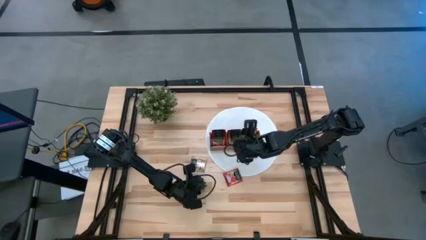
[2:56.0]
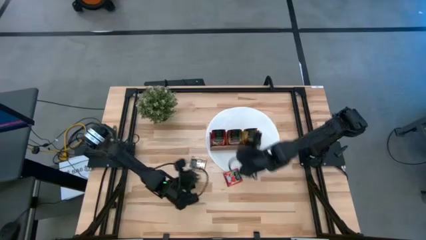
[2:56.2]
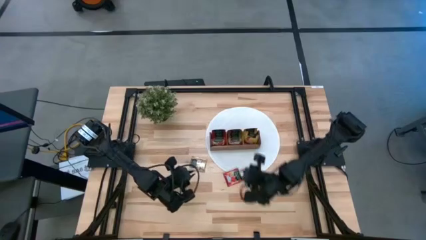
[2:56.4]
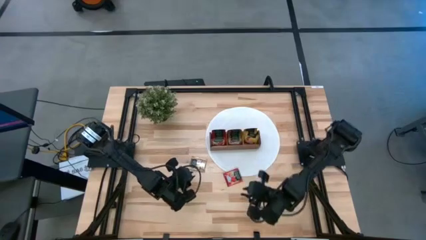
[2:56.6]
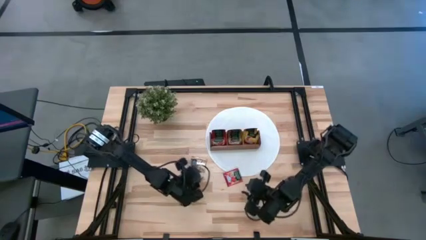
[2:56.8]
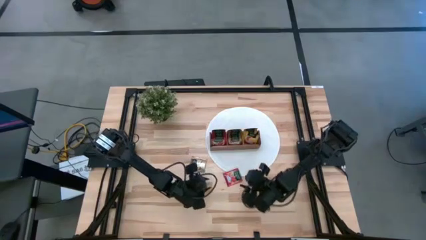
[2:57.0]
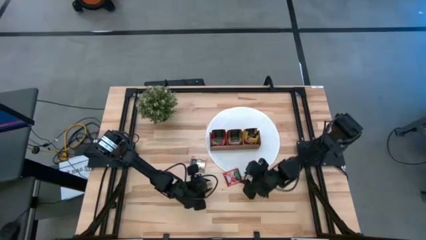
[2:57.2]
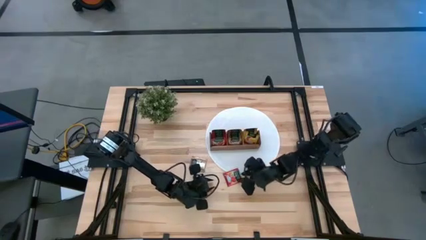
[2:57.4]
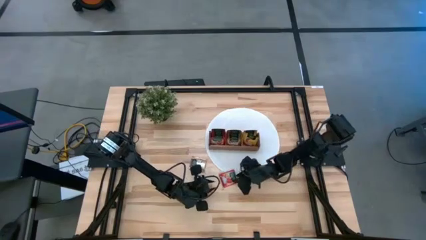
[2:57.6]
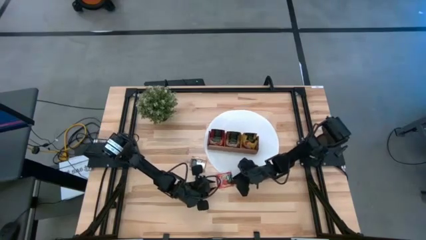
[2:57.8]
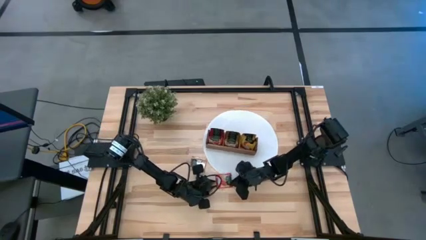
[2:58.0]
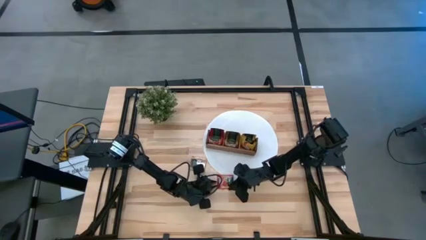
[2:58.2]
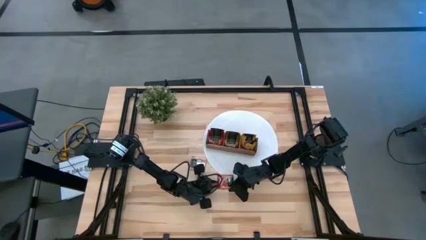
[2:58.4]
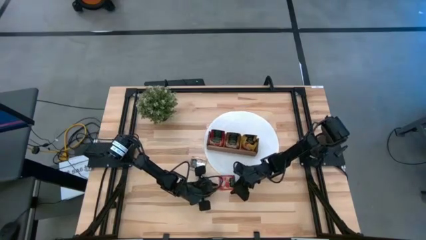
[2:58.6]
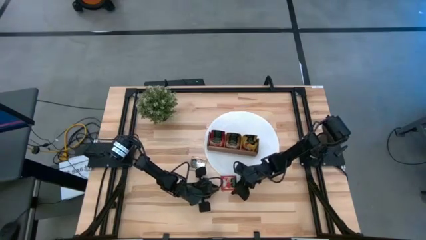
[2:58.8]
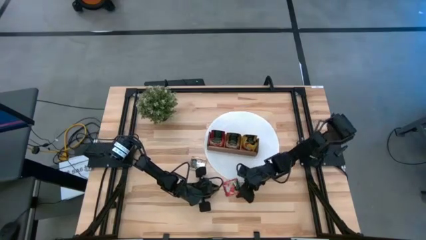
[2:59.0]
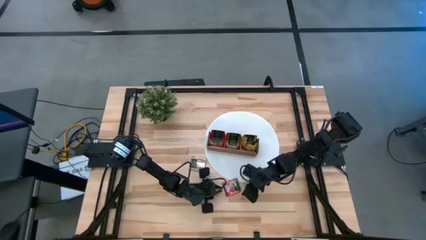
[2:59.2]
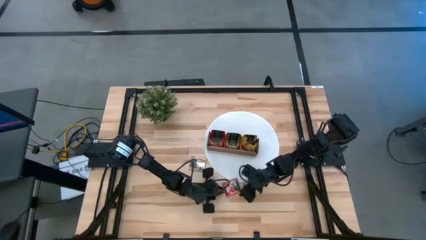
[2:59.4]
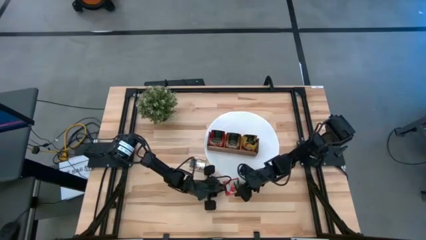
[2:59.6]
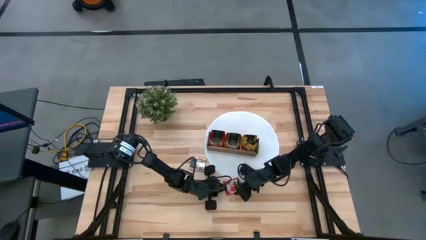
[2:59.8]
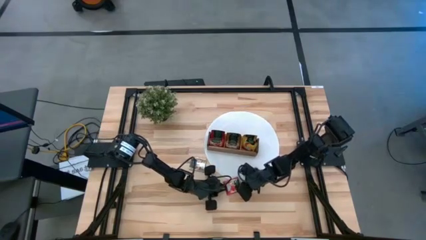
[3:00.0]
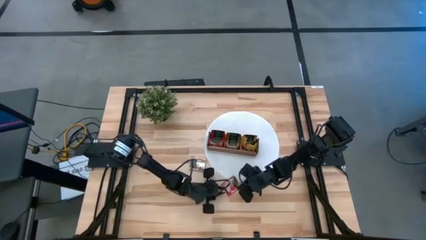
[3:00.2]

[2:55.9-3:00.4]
Task: Pick & Place Tea
Put the red tea bag into the left section of the wooden organizer

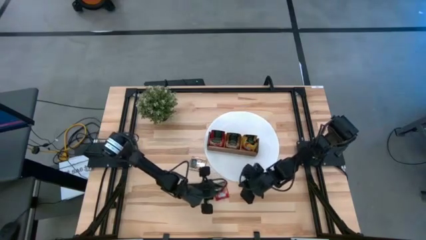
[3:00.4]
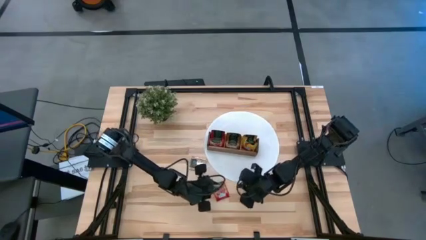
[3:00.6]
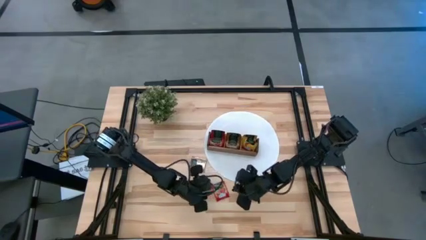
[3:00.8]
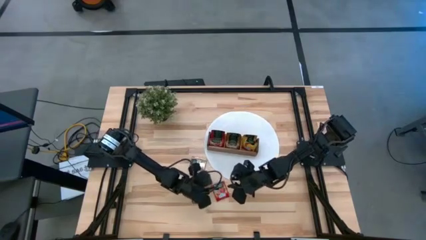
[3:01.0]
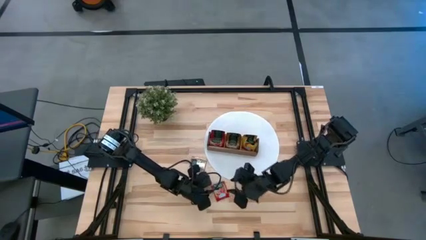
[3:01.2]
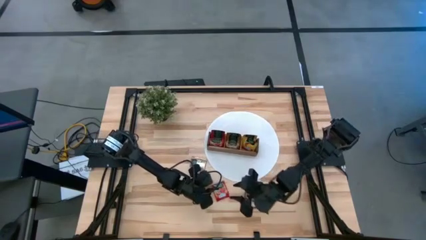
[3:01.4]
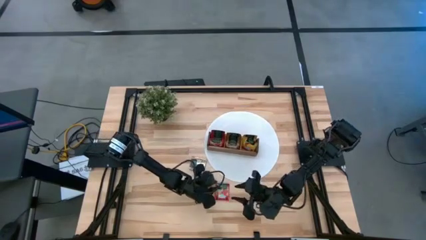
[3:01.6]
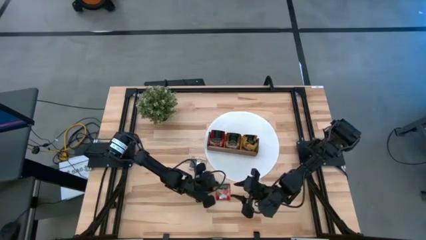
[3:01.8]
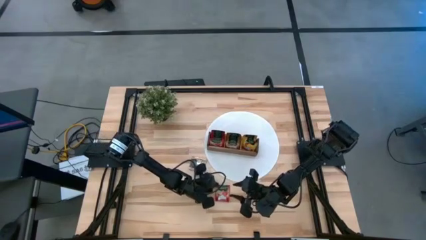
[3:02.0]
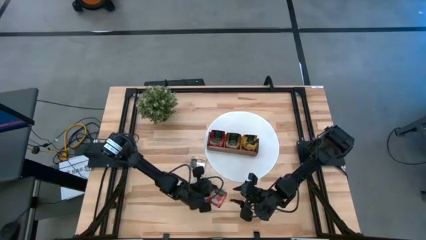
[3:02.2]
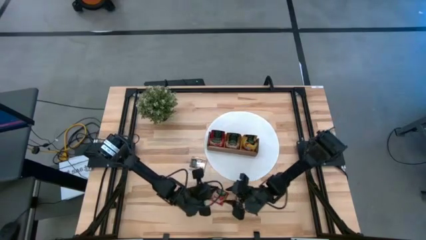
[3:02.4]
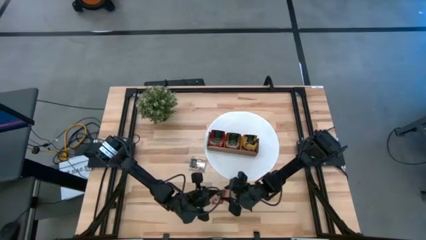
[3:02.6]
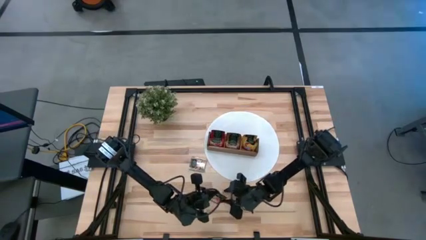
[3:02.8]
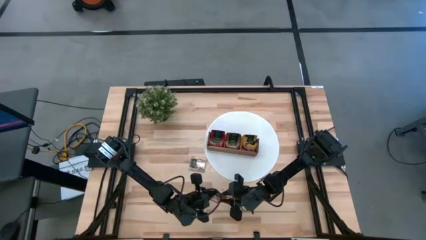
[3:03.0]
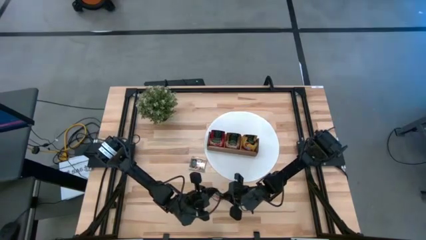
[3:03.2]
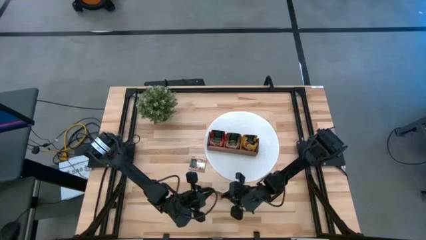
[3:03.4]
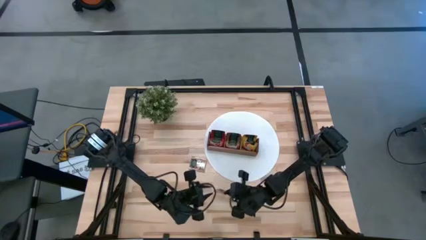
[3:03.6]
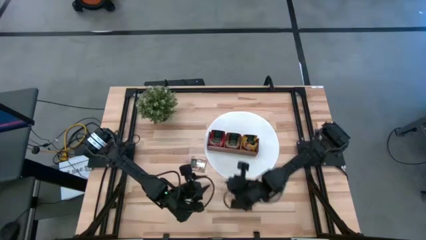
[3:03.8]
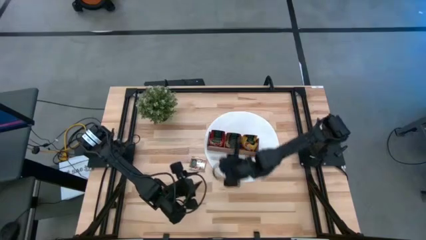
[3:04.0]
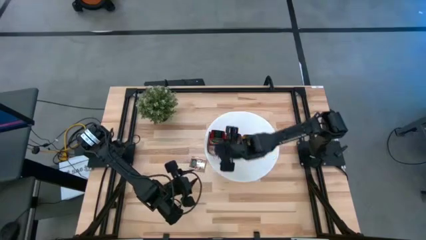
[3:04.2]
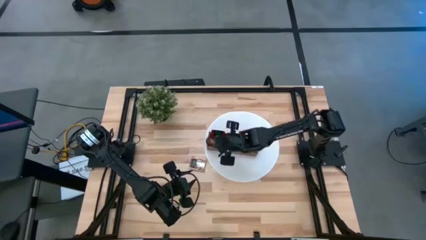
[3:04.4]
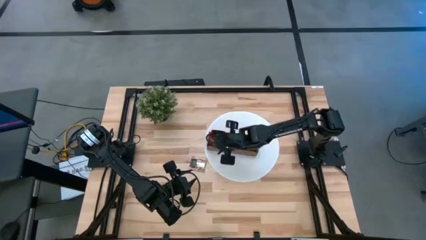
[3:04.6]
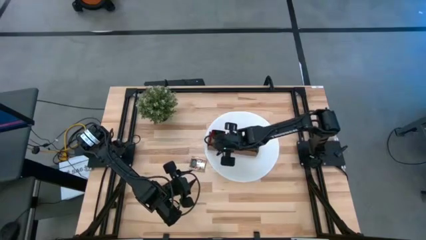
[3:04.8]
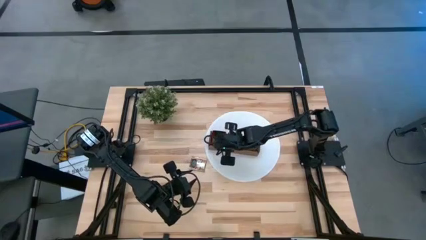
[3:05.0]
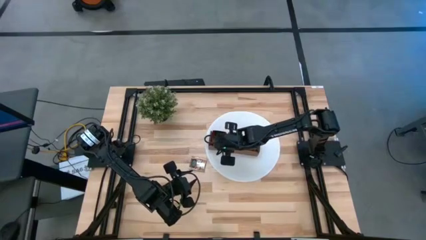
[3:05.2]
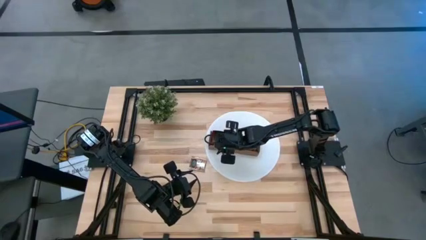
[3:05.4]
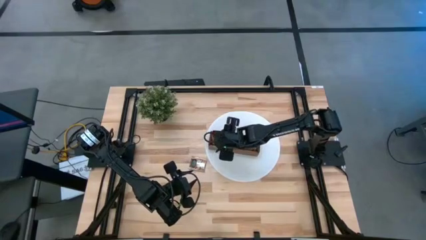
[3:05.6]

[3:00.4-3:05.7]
Put the red tea bag into the left section of the wooden organizer

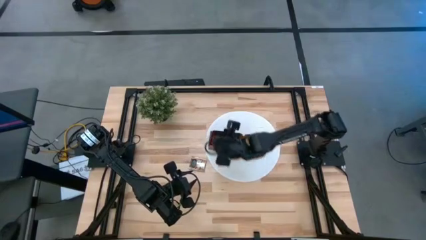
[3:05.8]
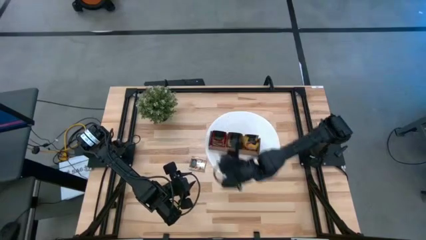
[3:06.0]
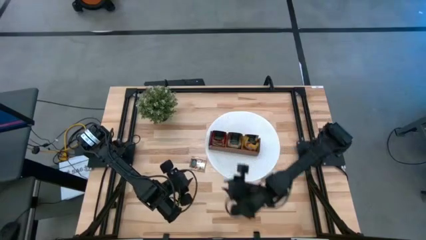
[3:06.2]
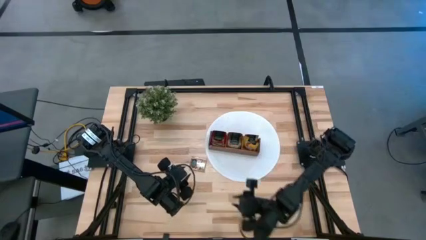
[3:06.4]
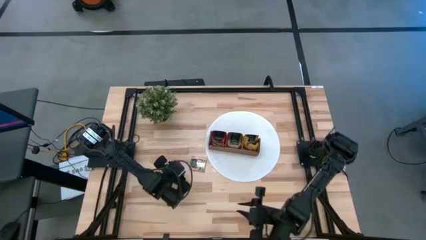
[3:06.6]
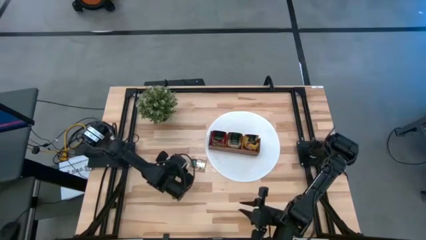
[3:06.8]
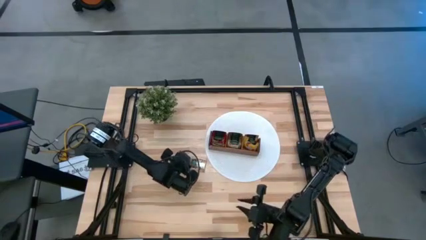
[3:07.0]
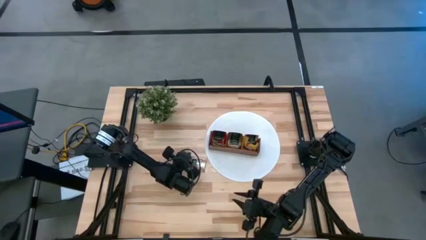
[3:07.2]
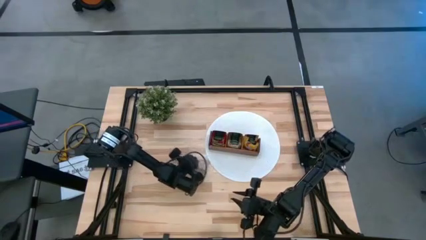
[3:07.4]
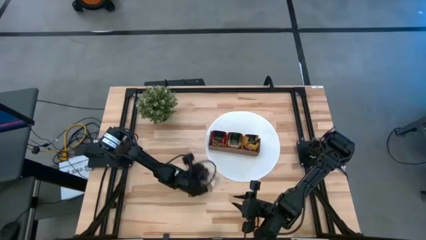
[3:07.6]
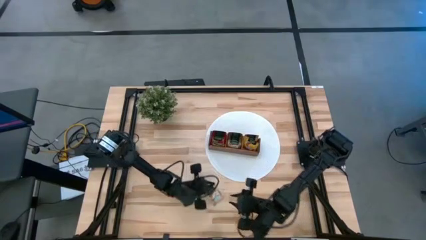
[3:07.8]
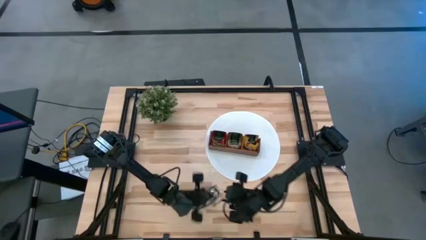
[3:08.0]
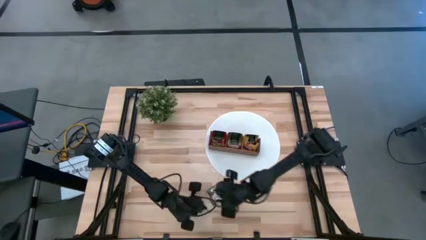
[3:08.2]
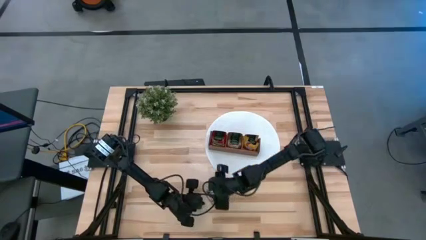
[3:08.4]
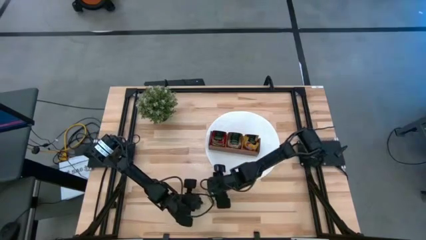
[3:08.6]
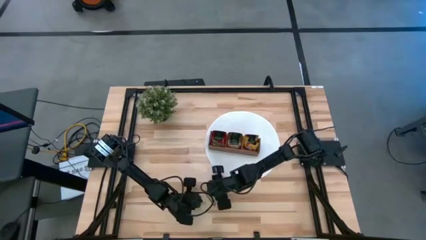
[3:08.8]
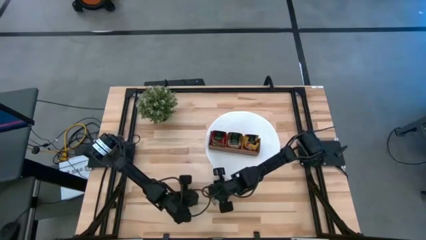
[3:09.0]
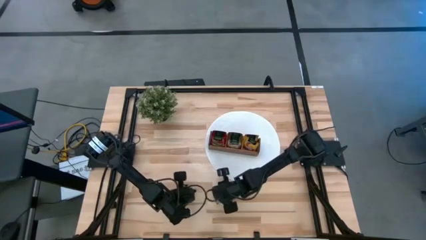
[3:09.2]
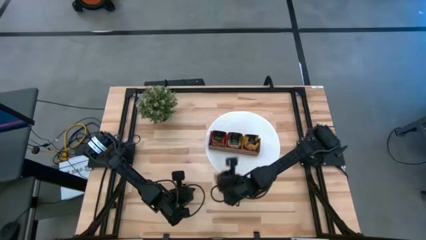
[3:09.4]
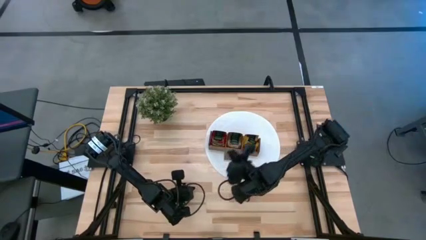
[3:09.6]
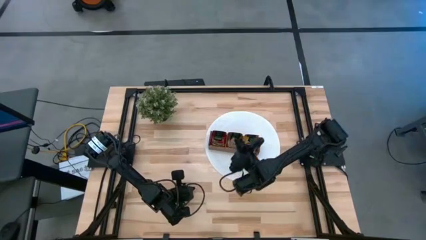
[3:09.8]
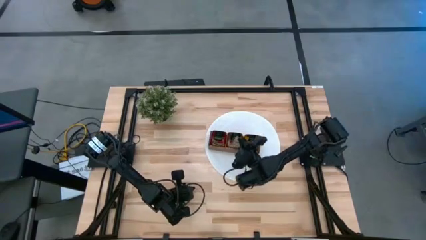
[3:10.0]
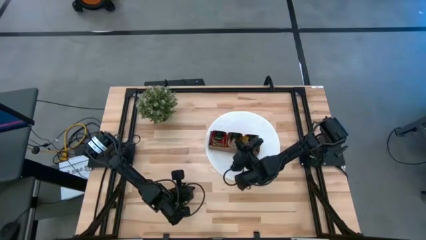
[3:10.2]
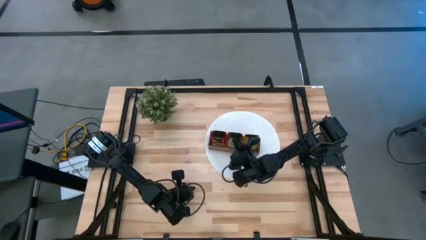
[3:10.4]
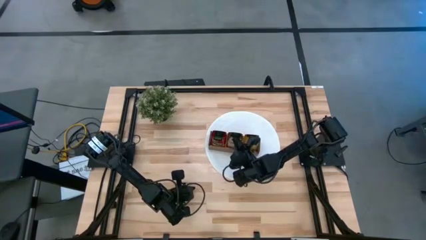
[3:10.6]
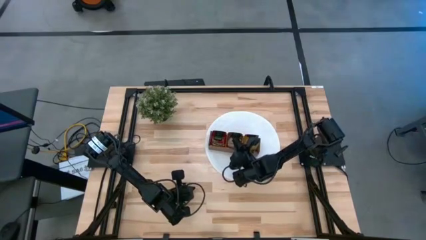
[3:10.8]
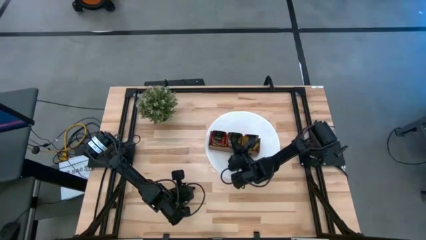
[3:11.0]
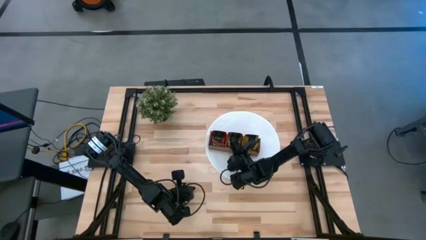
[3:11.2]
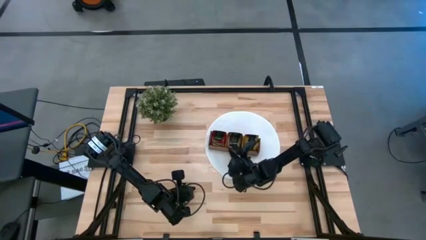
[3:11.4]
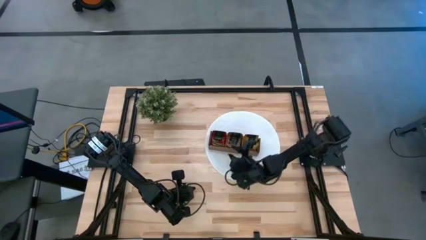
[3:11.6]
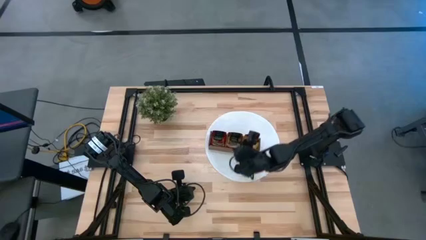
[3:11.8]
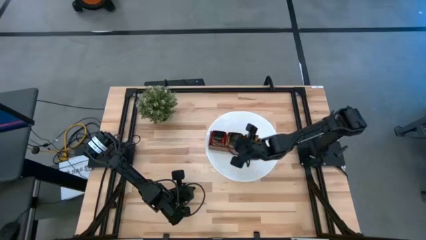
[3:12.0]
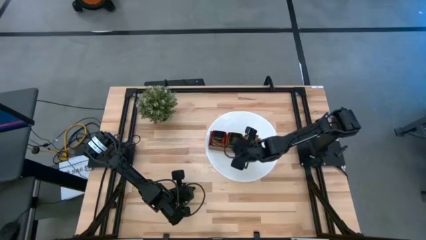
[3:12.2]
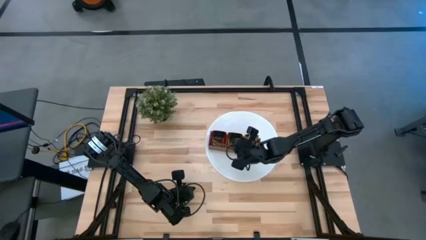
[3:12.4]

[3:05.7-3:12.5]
Put the brown tea bag into the middle section of the wooden organizer

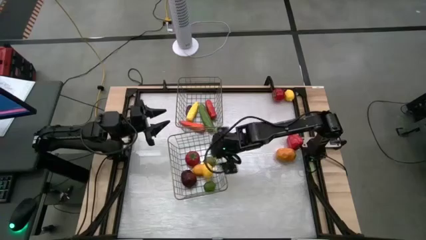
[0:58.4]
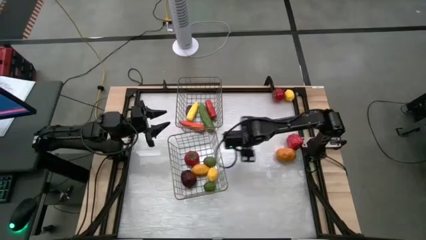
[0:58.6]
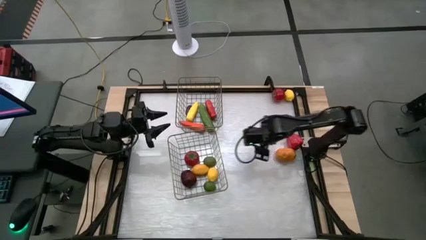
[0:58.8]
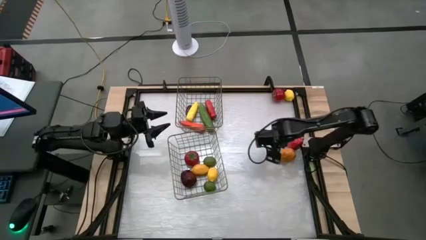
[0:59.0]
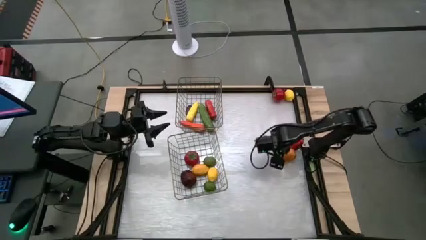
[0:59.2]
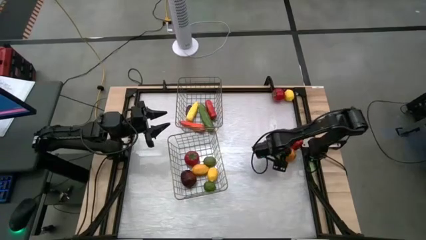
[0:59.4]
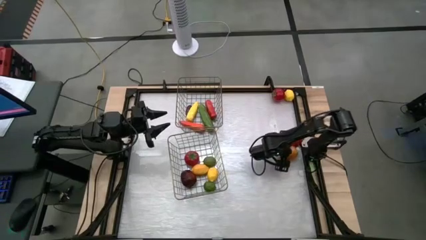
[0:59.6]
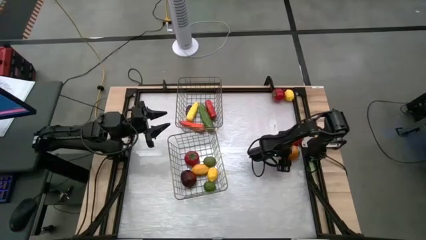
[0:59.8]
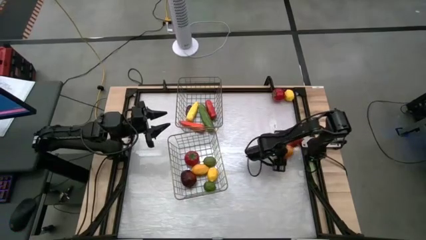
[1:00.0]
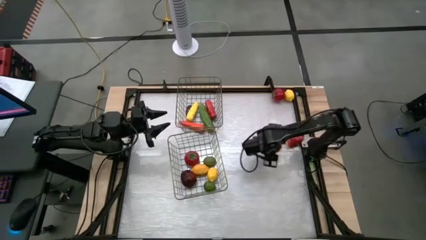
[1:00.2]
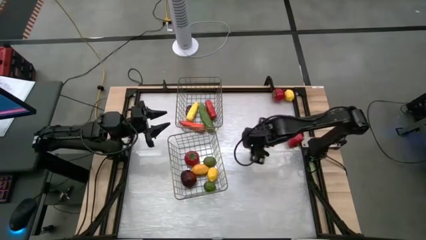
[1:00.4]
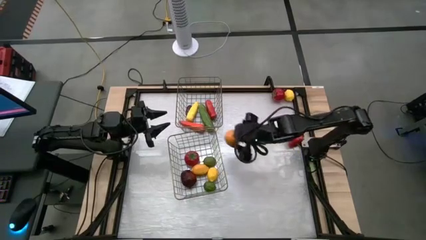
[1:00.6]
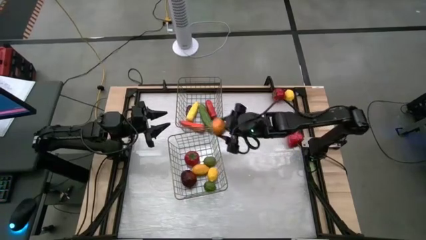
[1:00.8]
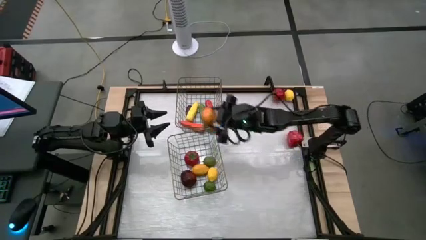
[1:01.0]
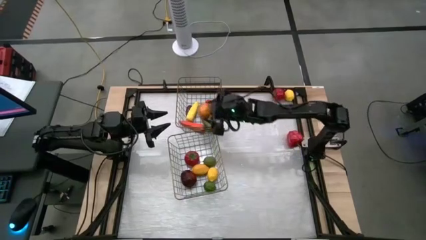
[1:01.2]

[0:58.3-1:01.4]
Task: Sort produce into baskets
Put the brown potato into the top basket
